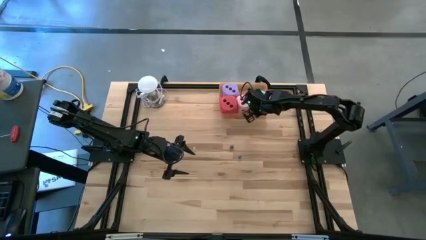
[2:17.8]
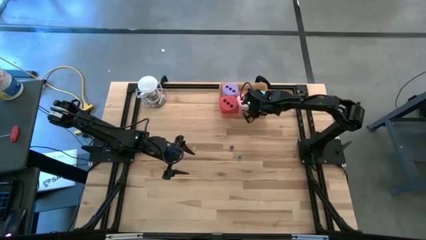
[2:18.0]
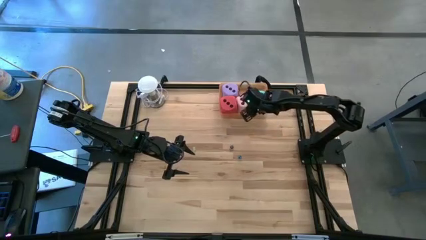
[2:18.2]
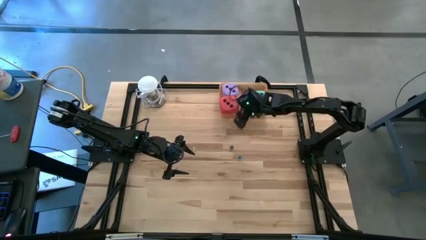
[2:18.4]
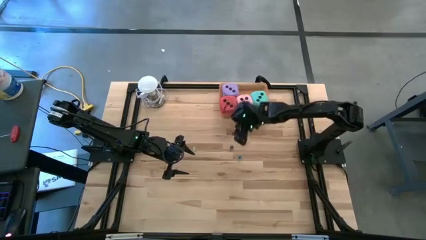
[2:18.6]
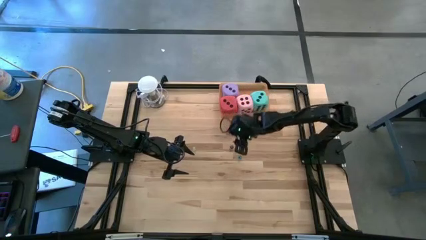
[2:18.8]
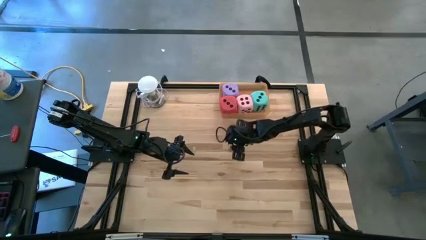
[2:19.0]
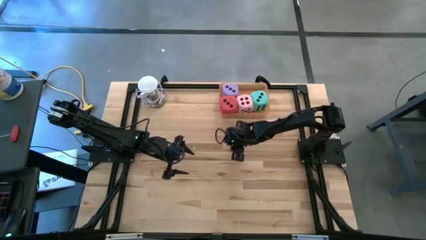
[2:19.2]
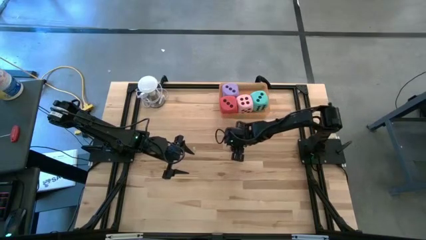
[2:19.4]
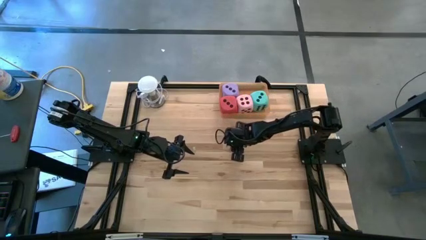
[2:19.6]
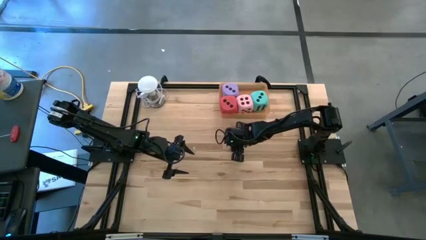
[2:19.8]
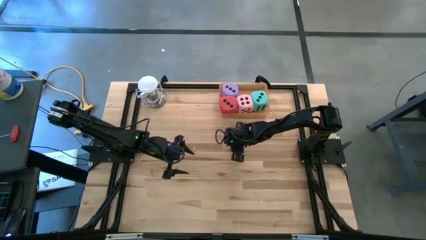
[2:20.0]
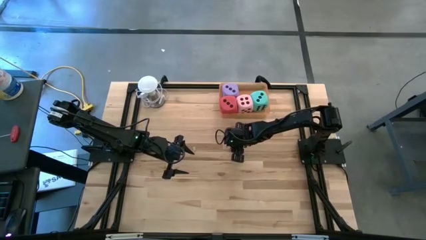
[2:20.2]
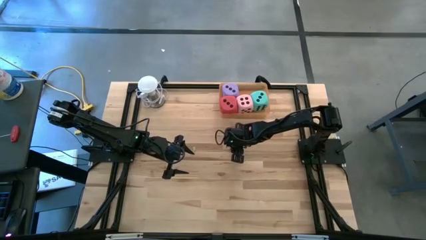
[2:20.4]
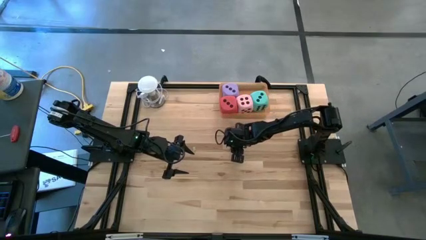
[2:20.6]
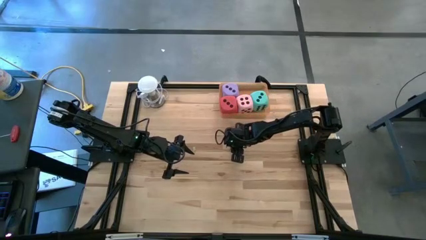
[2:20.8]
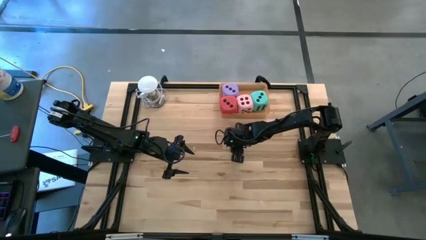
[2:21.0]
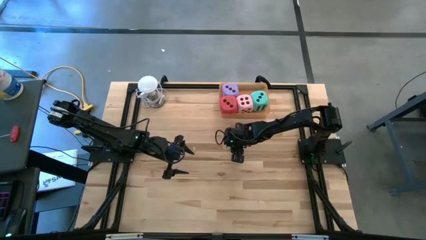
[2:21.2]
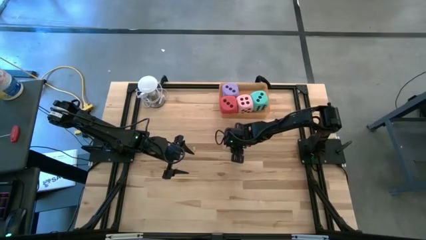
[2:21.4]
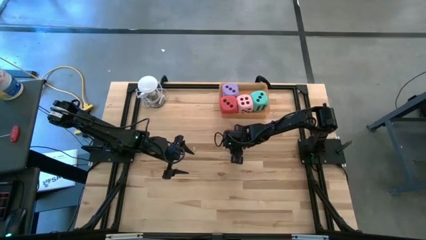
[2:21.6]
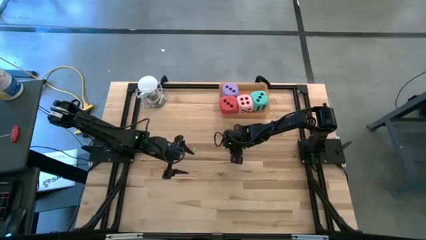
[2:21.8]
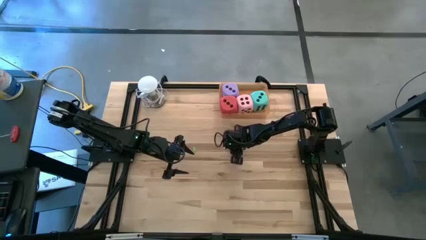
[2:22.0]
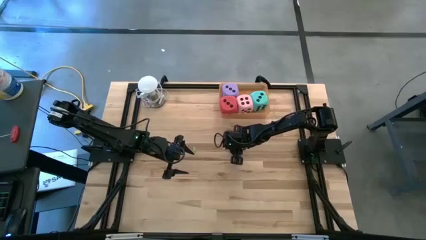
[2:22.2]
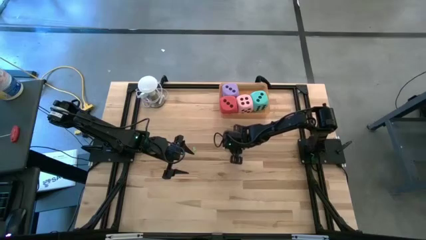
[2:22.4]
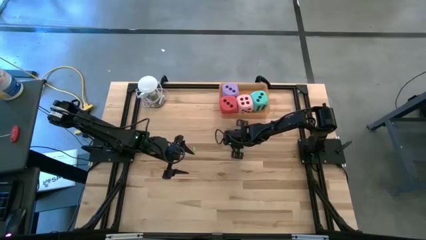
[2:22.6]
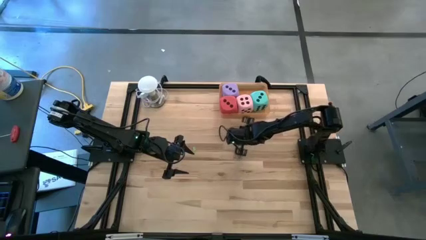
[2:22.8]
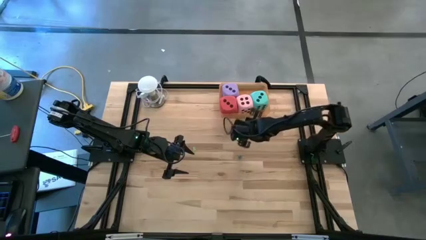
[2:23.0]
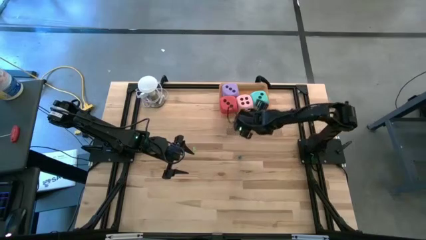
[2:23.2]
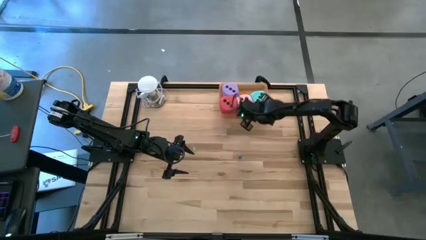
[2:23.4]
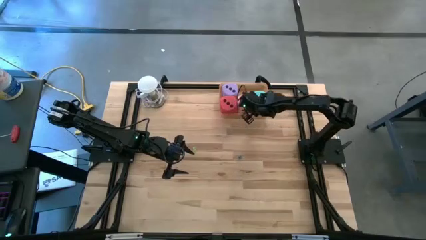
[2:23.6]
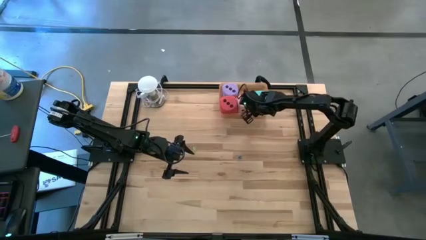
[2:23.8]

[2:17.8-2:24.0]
Task: Pick & Place Dice
Put the small black die into the orange bin

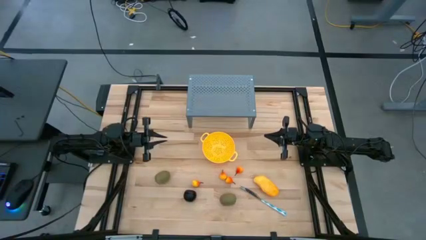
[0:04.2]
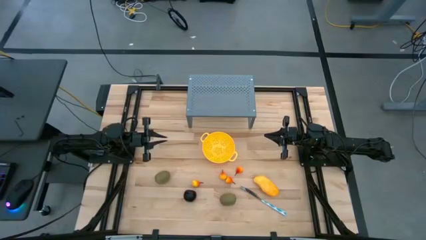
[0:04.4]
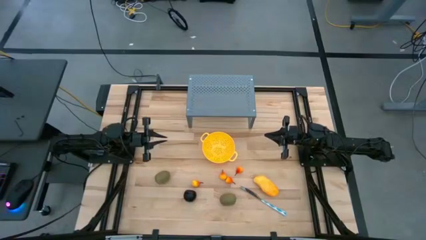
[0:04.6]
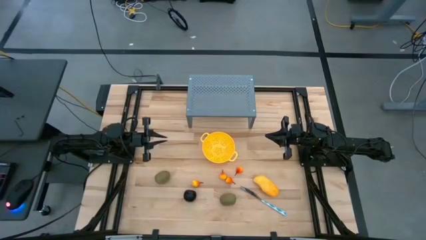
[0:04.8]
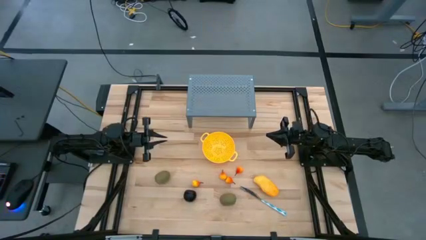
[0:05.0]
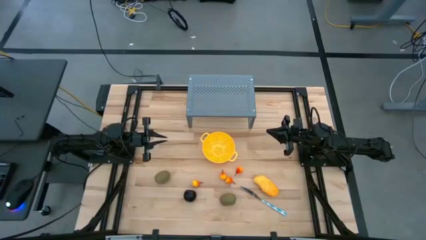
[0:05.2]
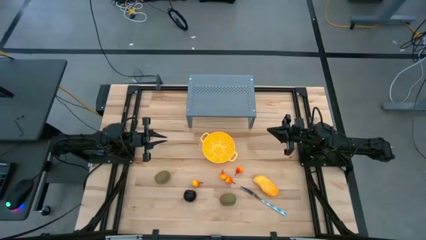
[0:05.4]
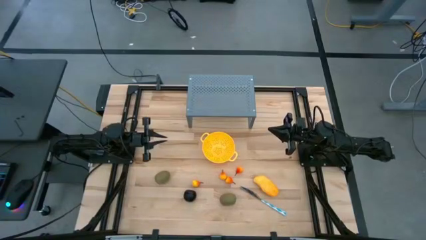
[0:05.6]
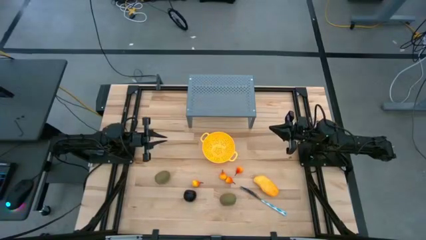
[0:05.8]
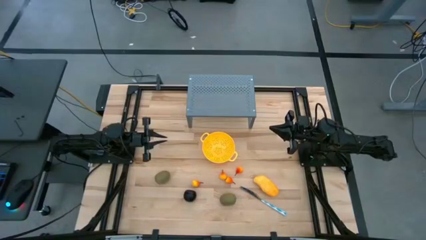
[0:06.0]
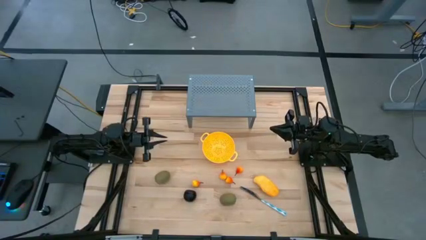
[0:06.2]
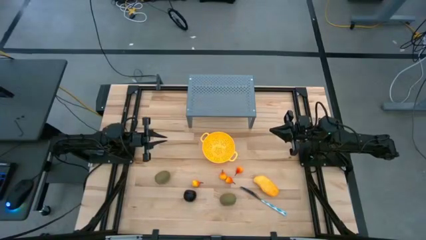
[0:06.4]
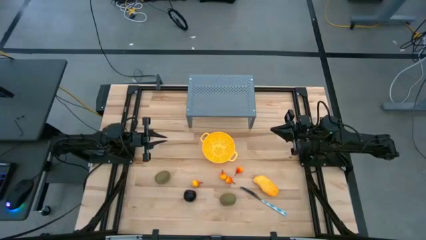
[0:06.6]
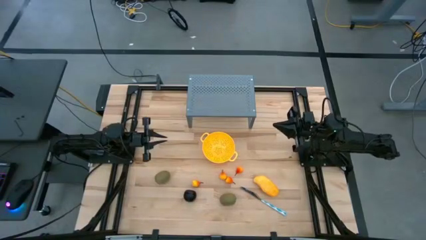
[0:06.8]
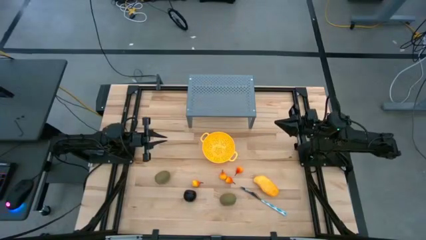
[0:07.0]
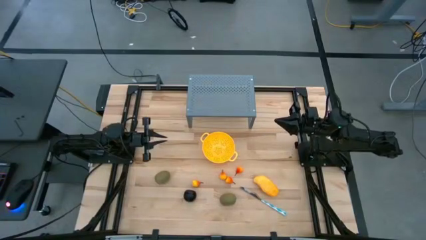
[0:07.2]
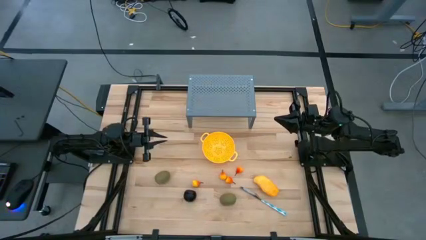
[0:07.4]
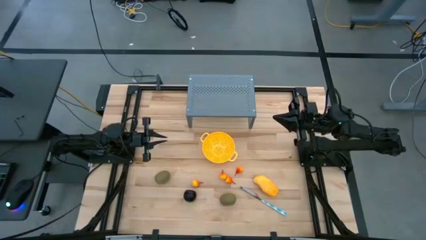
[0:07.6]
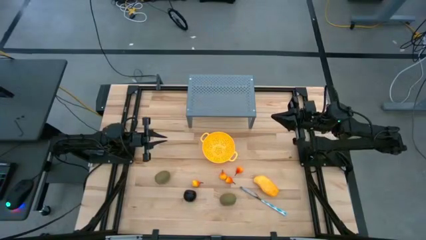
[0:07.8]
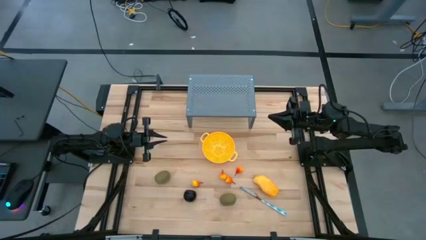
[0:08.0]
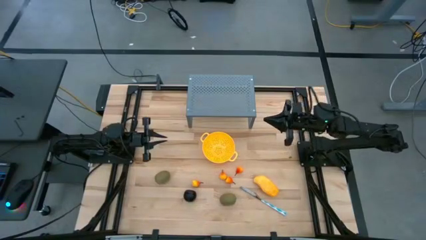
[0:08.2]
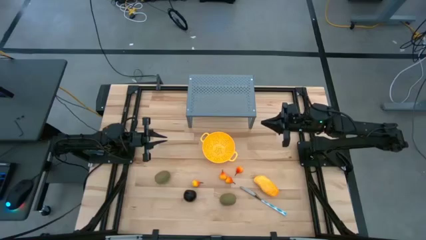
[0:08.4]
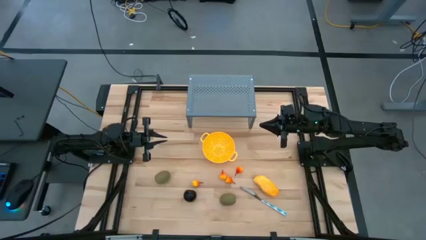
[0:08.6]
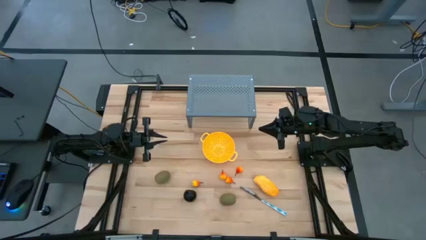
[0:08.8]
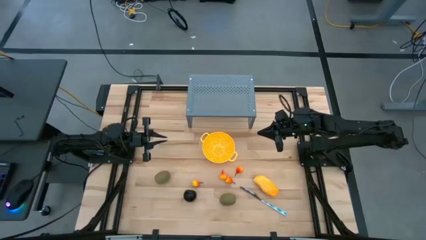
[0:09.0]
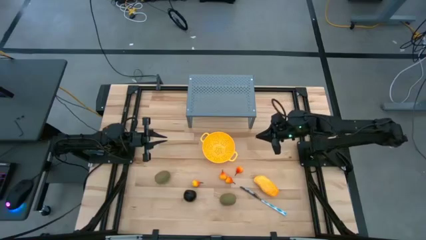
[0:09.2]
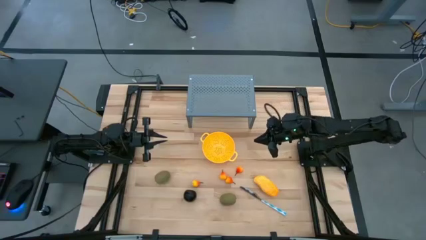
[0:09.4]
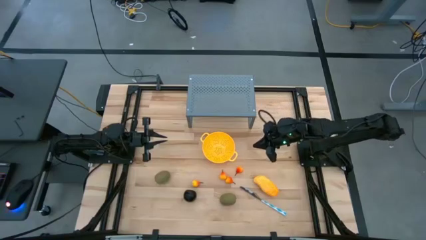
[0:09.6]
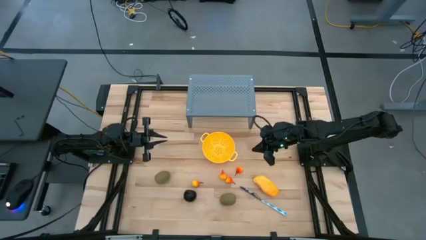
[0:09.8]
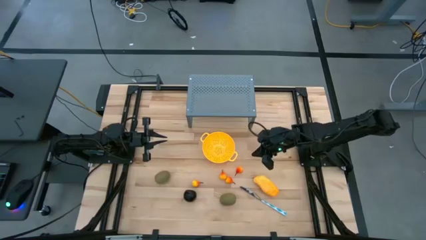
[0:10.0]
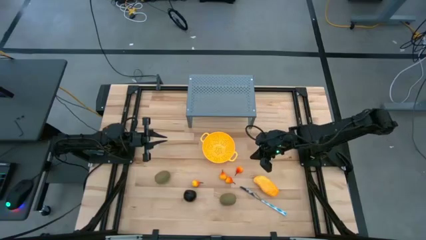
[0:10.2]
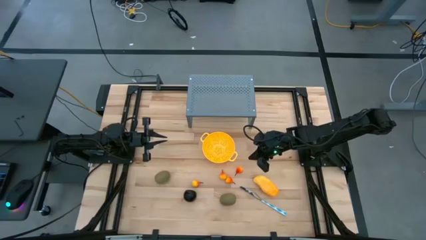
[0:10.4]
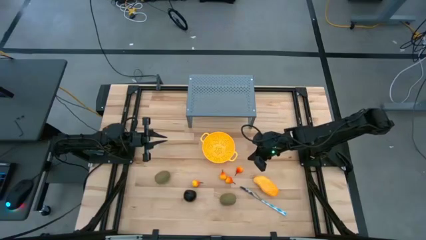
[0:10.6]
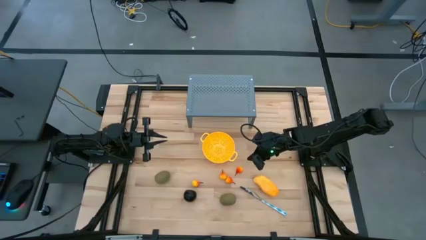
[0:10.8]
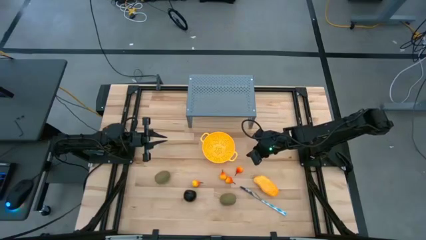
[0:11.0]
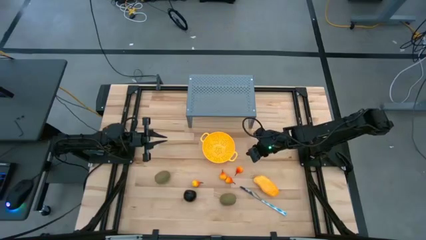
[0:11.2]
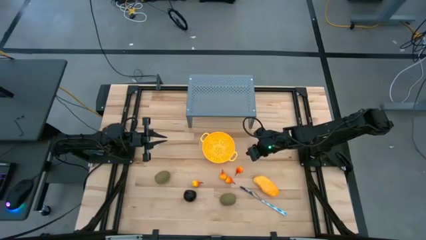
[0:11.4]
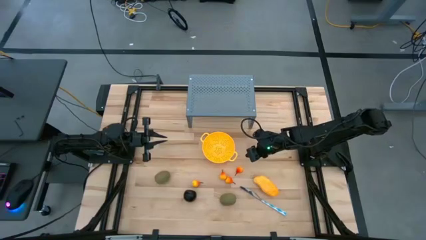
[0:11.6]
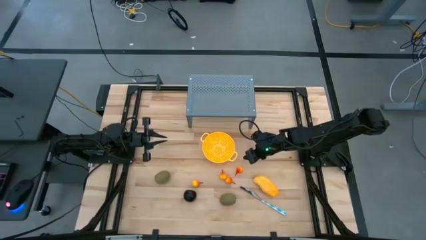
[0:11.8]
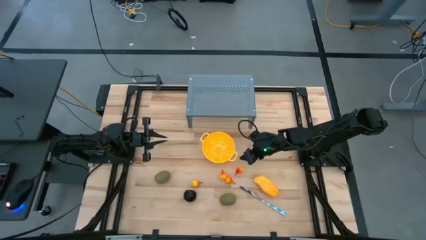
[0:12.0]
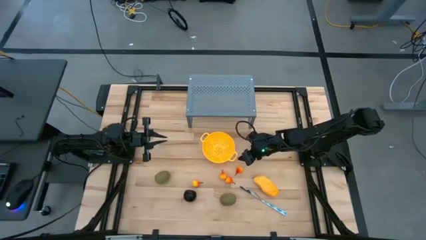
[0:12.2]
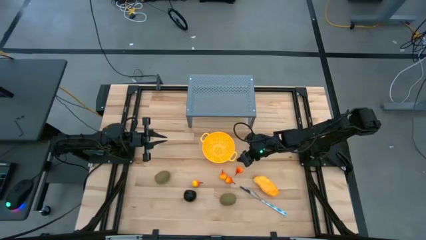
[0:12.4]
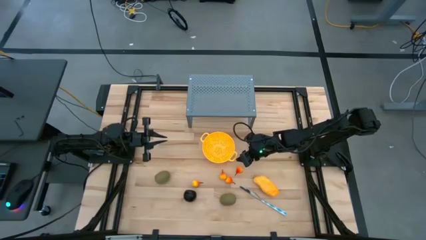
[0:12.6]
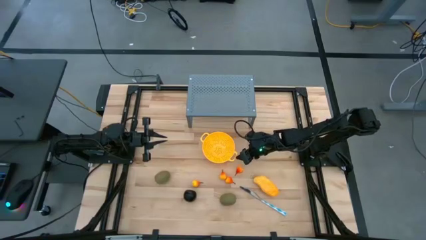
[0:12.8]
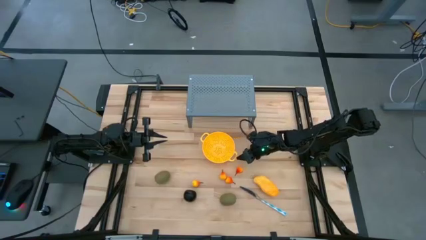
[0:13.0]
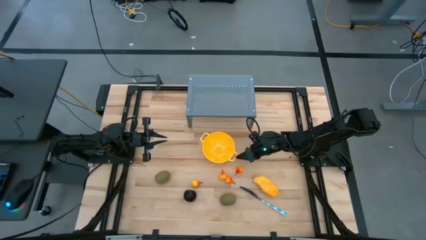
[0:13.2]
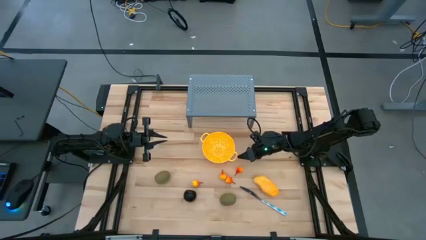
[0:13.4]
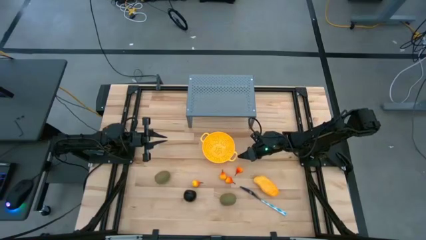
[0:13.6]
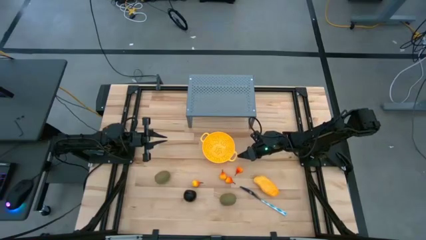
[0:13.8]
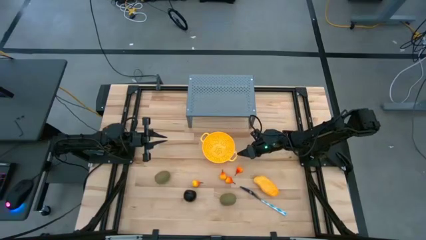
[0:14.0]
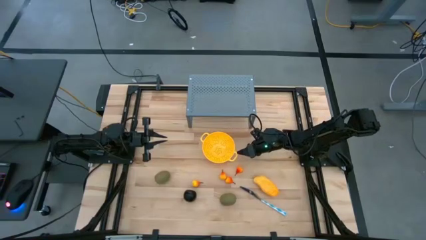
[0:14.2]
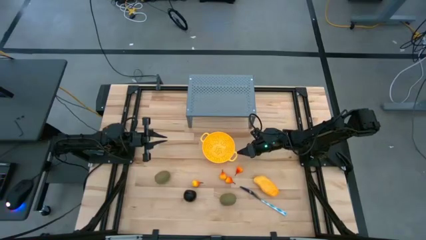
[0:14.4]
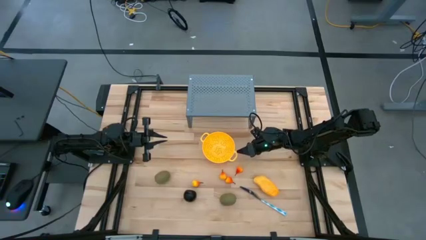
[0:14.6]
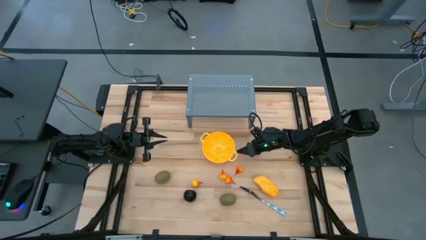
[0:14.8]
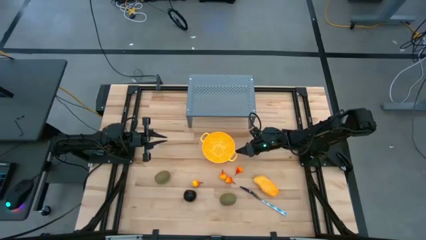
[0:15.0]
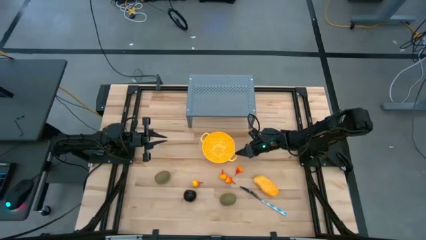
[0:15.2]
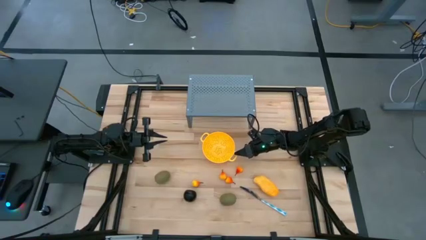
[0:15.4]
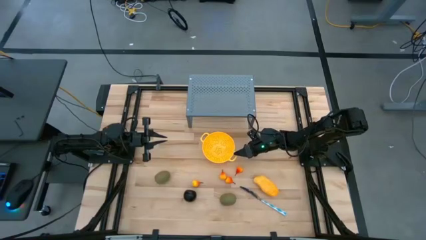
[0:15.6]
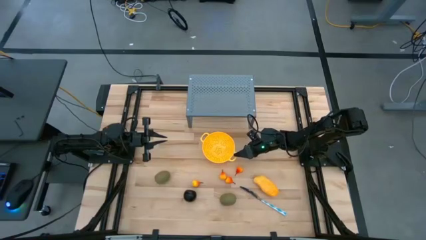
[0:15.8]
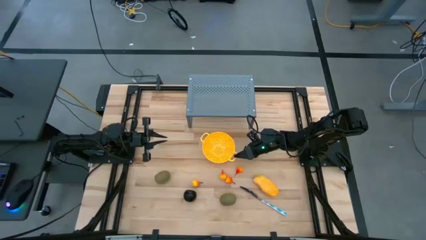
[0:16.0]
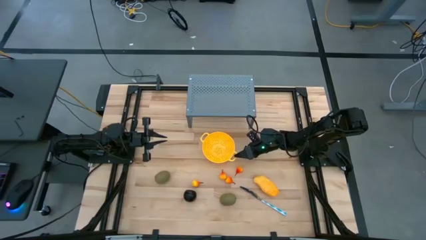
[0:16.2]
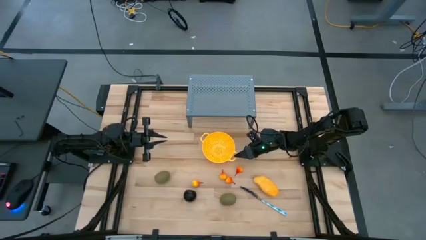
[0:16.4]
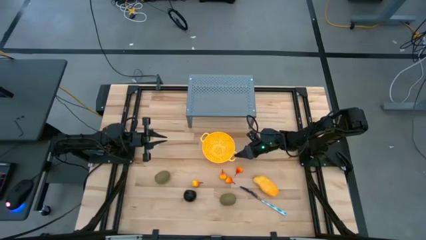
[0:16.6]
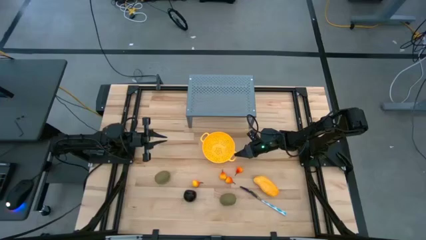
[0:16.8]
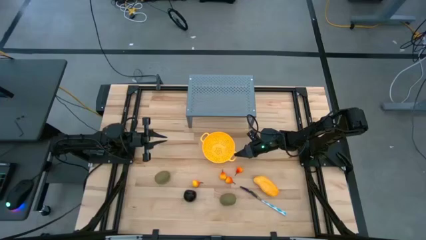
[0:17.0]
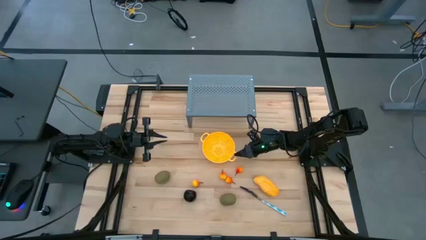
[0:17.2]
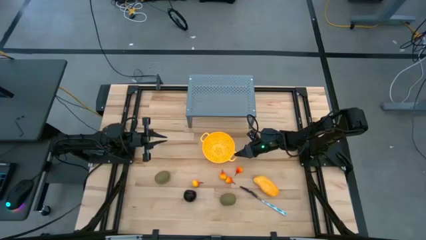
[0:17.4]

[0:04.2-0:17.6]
Task: Pick & Place Fruit
Put the yellow strainer bowl on the shelf
